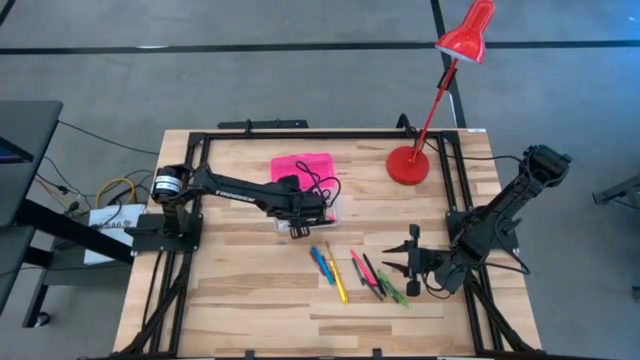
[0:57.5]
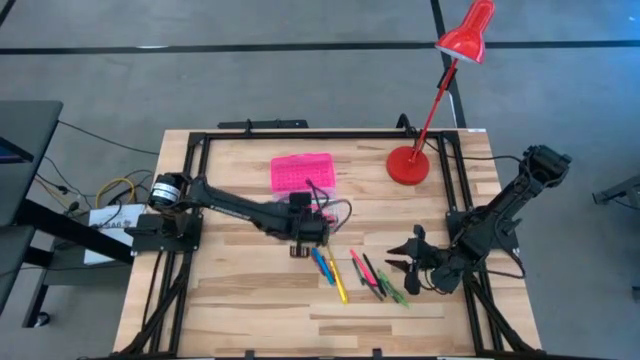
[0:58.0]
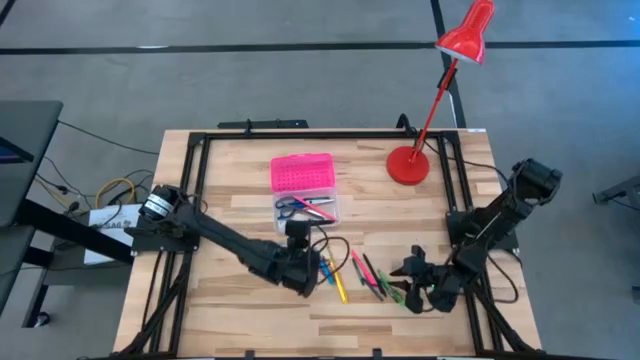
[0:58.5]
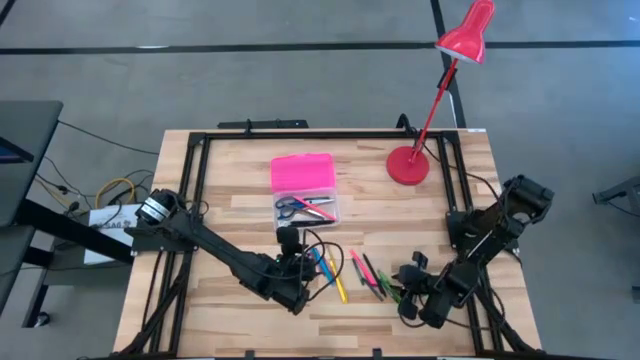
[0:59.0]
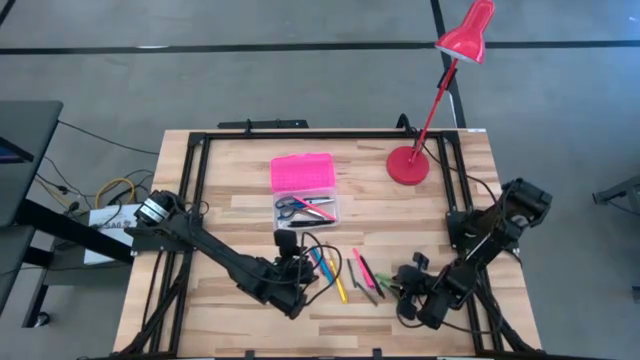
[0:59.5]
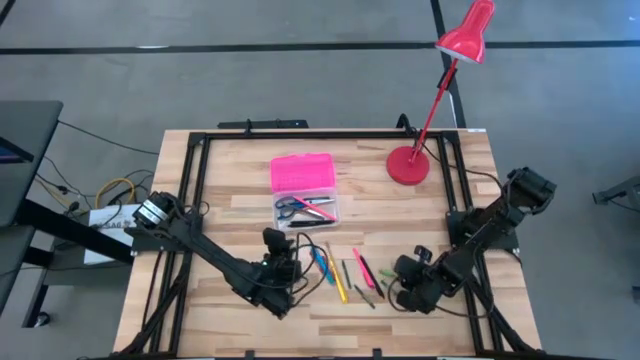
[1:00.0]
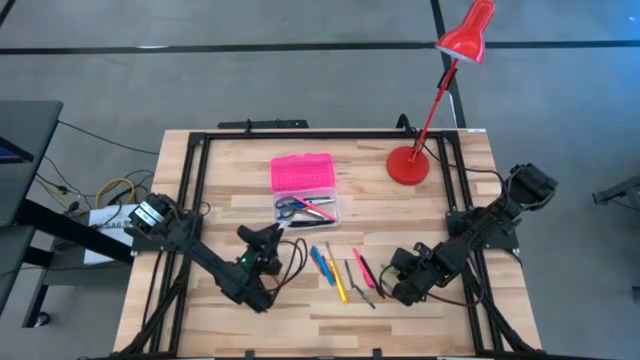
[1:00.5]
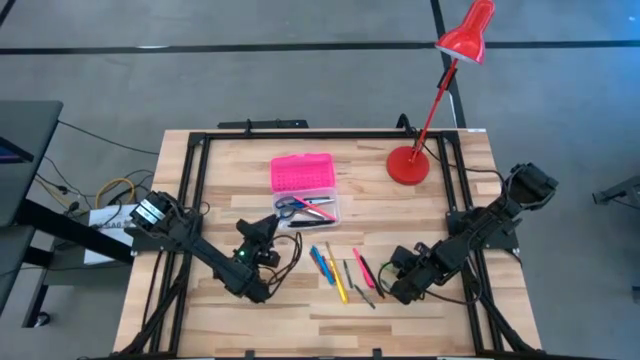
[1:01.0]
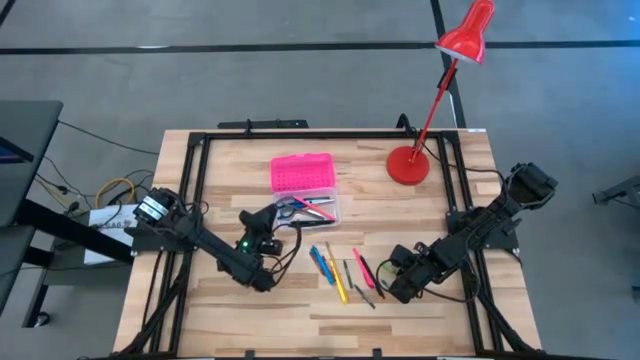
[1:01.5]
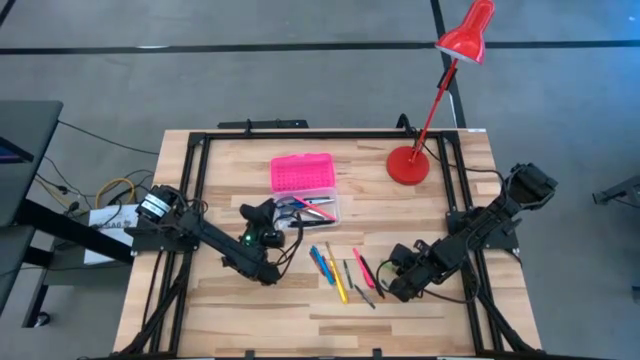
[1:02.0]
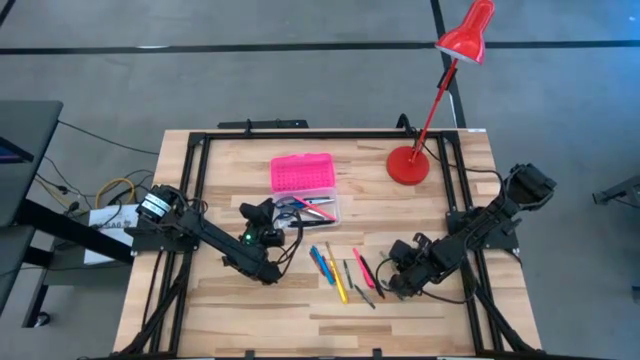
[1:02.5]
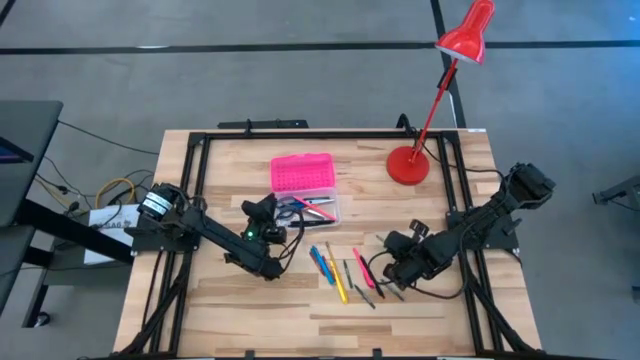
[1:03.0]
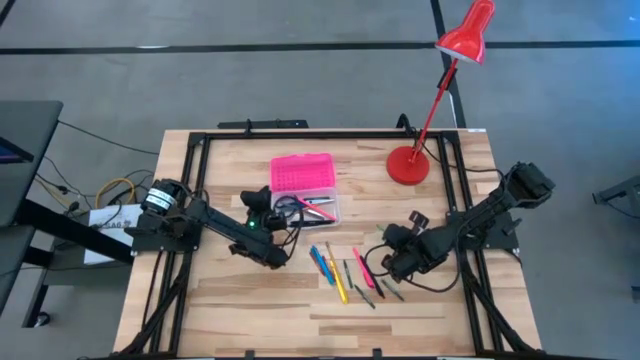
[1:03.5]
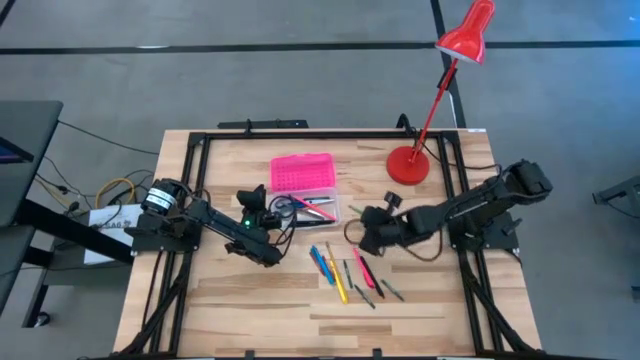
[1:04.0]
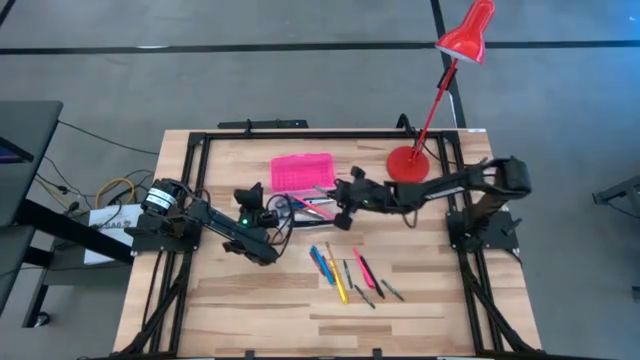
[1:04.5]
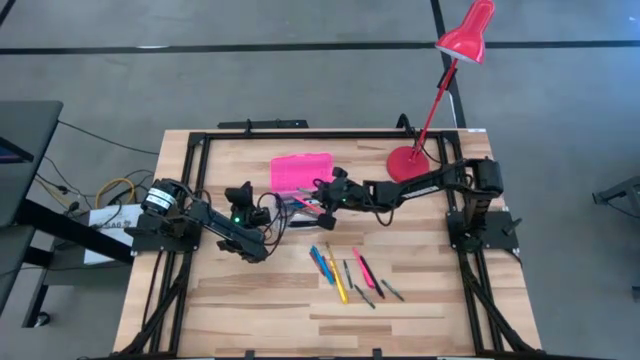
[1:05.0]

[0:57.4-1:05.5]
Task: Pick & place school supplies into a supply box
Put the green pen into the pink supply box

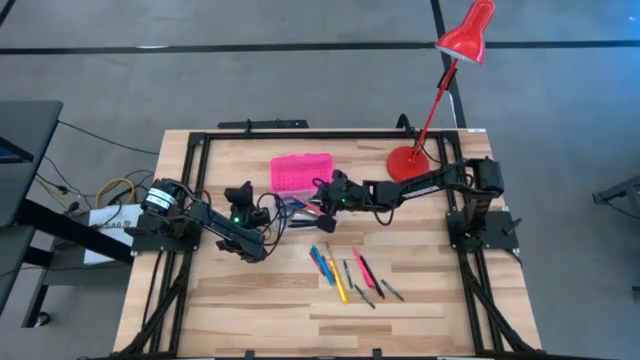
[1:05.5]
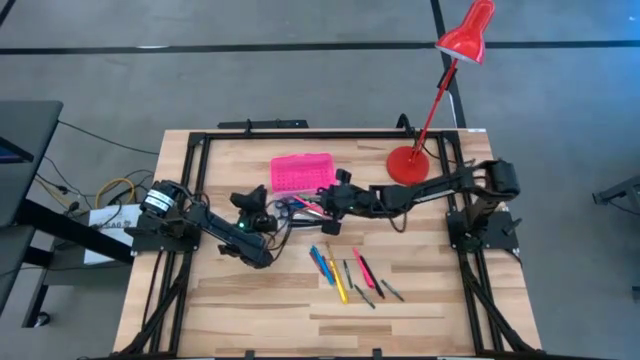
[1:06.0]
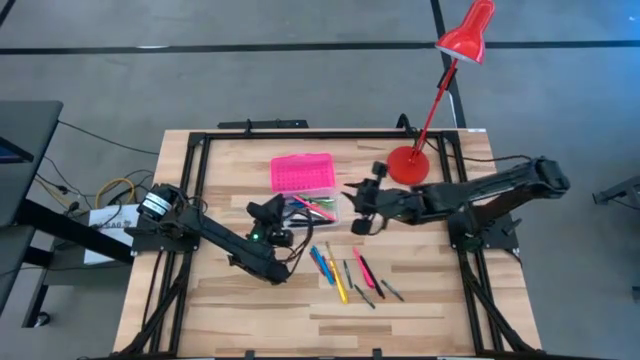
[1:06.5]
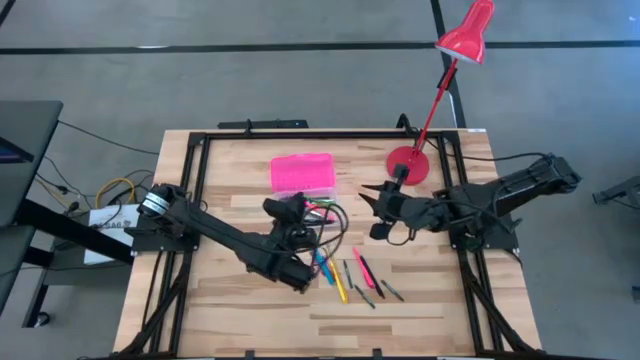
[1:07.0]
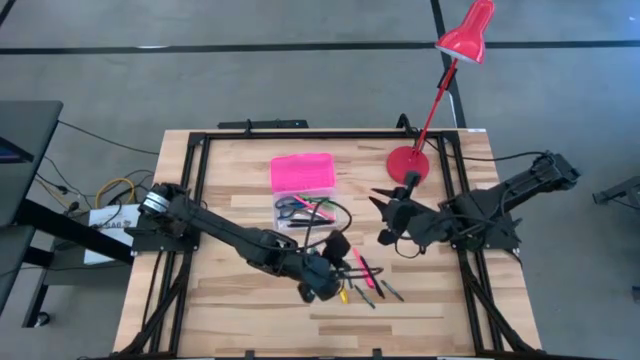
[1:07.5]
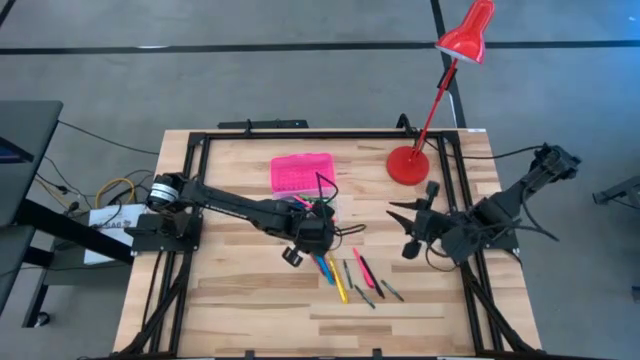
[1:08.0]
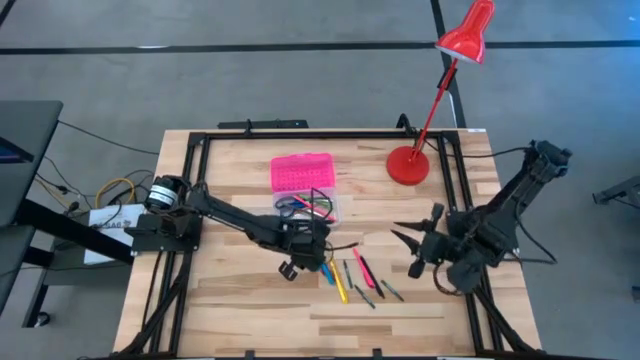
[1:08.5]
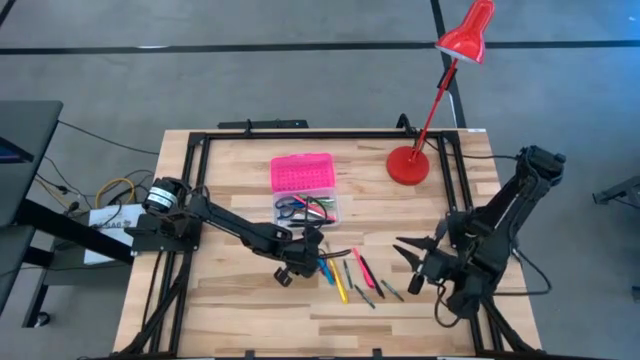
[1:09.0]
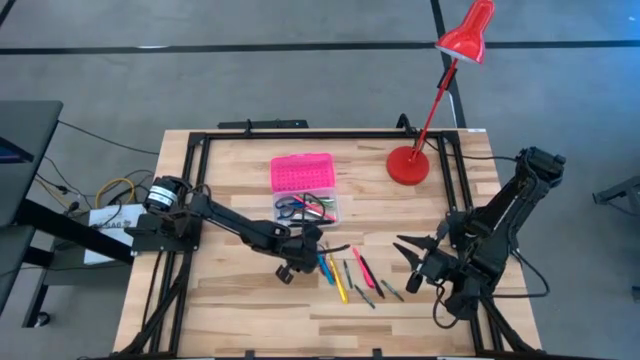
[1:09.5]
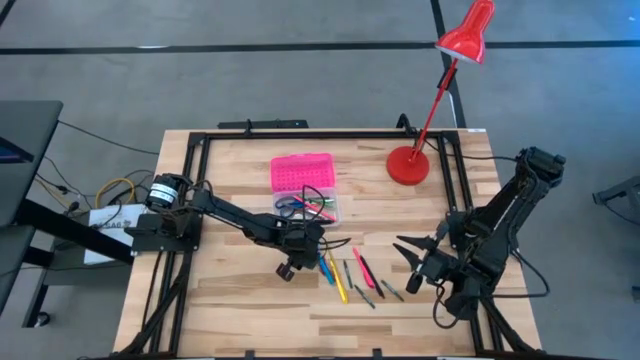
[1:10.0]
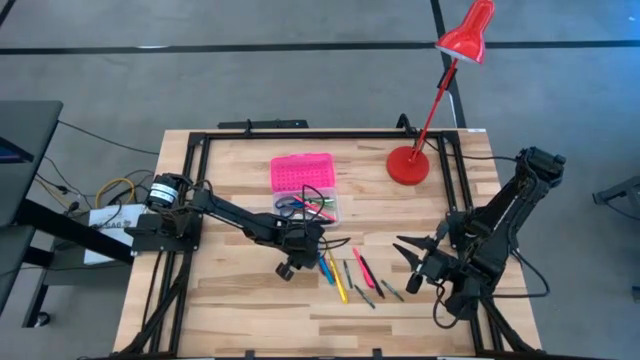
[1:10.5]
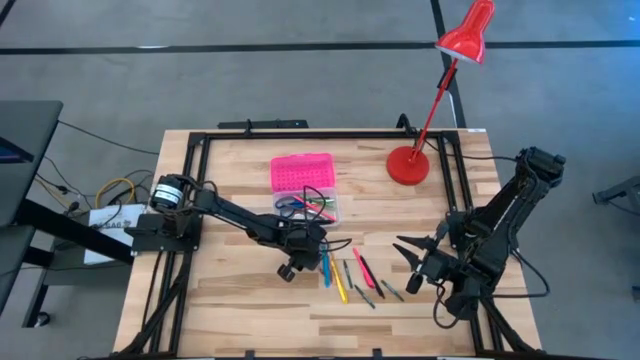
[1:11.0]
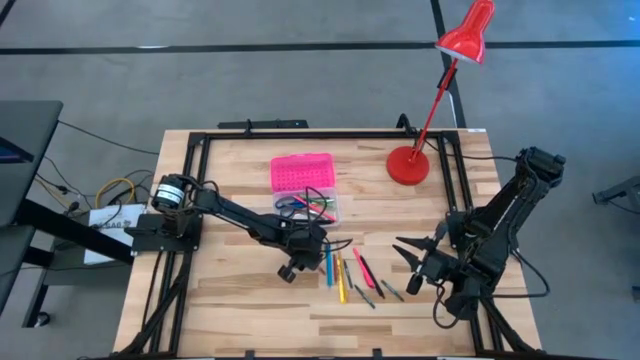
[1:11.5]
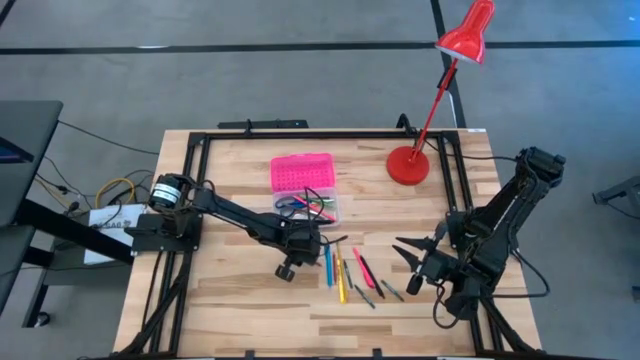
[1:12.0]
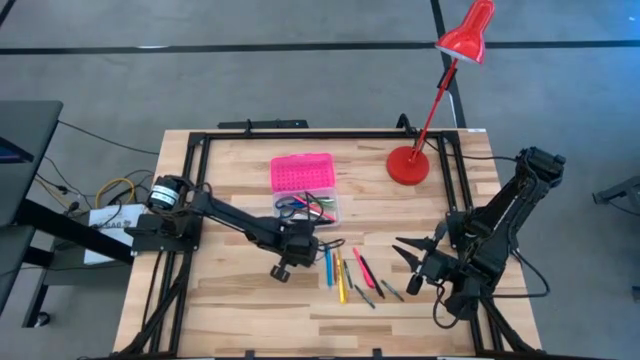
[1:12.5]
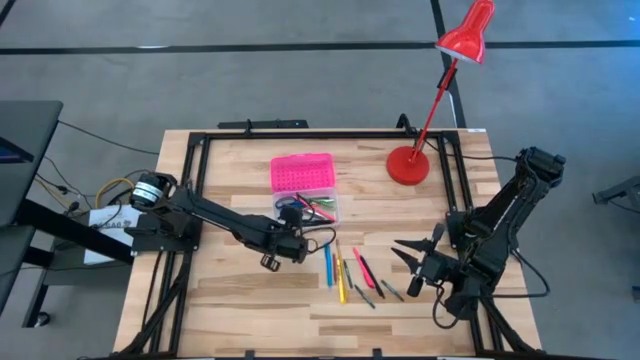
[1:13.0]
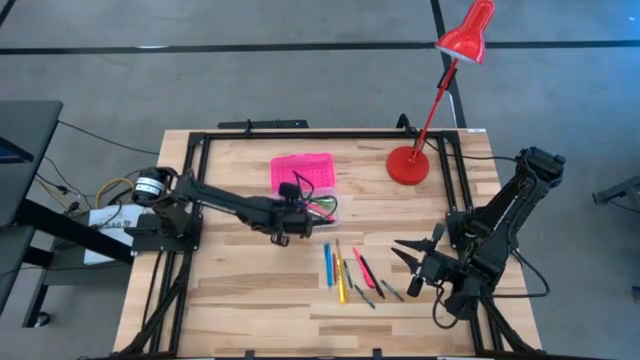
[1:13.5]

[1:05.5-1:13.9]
Put the red crayon into the pink supply box

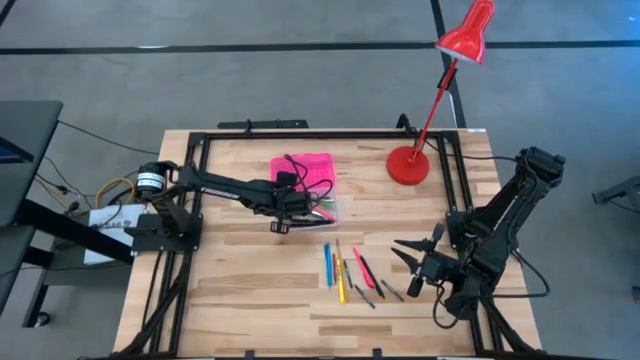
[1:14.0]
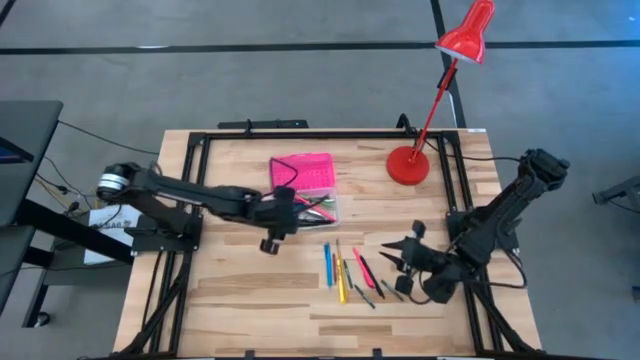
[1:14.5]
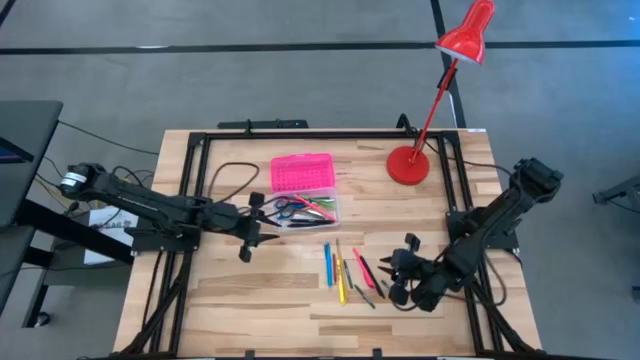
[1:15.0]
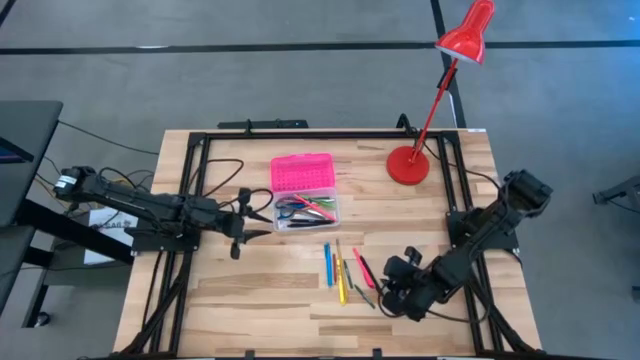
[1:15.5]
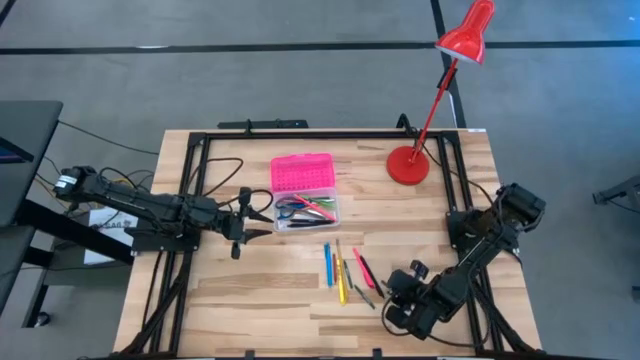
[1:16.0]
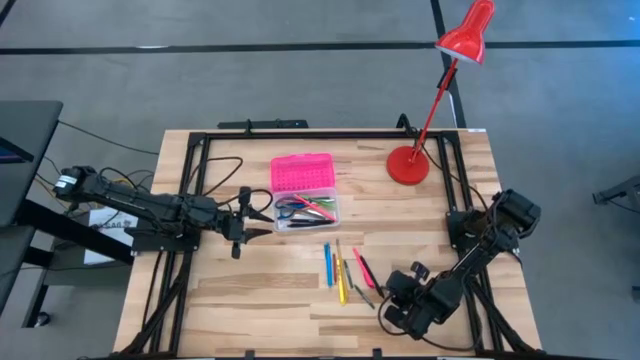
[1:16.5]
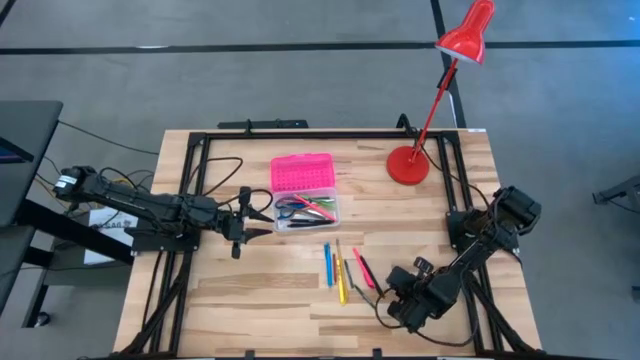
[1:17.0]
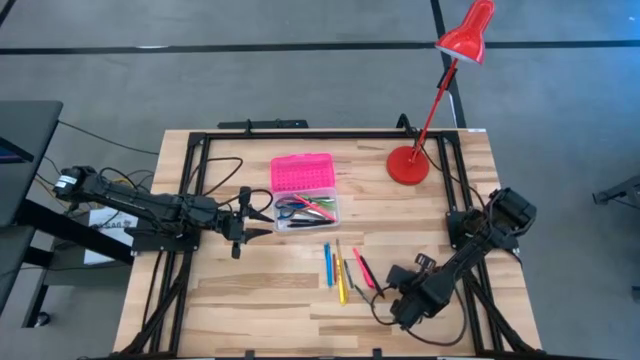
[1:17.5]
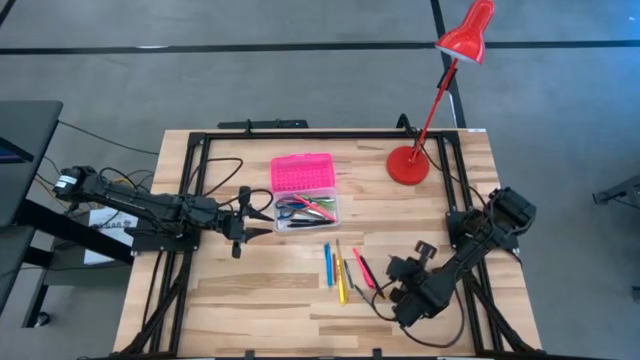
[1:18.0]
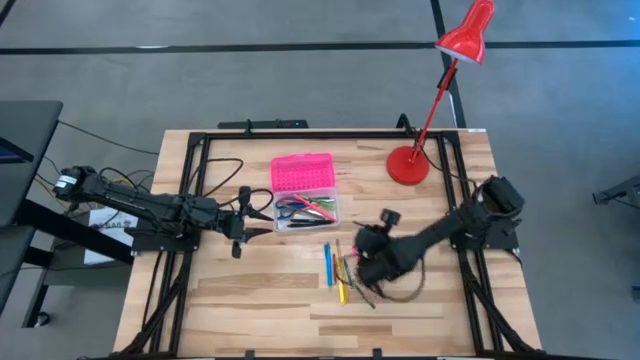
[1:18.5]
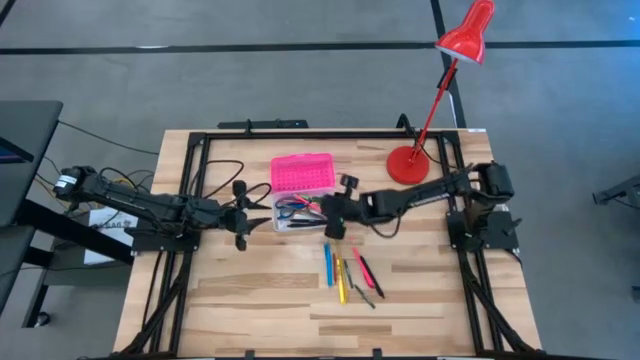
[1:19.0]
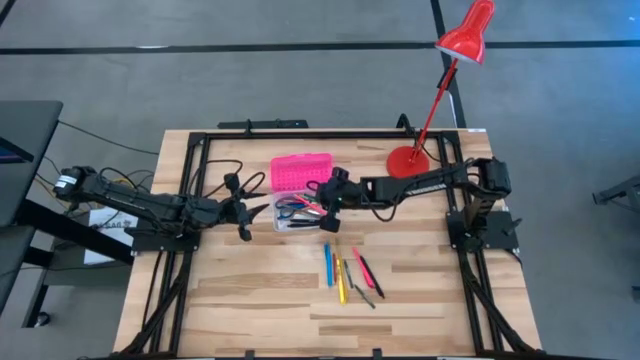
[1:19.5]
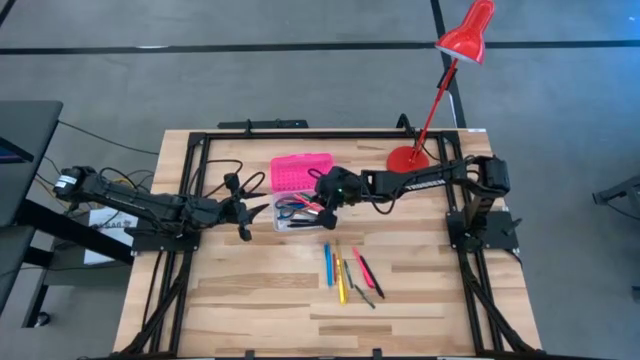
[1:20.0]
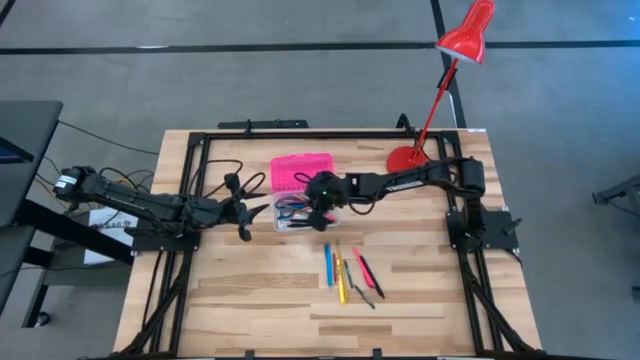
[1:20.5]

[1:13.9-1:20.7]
Put the green crayon into the pink supply box
